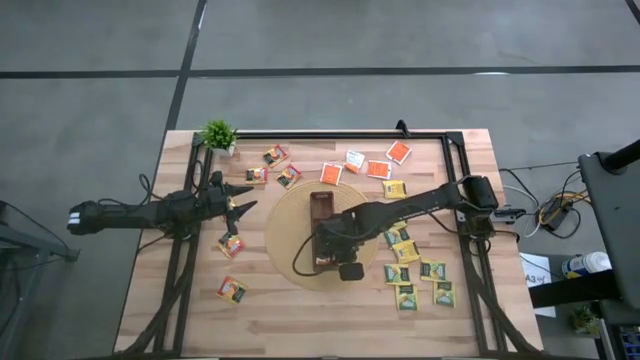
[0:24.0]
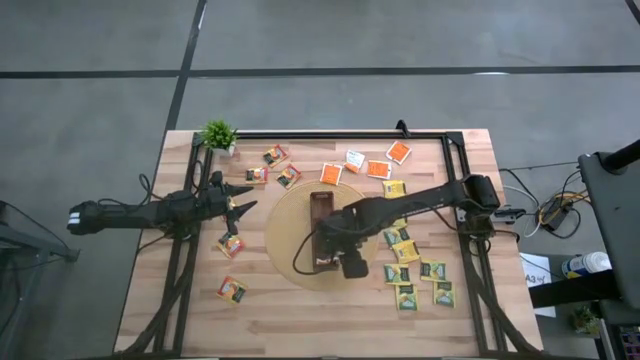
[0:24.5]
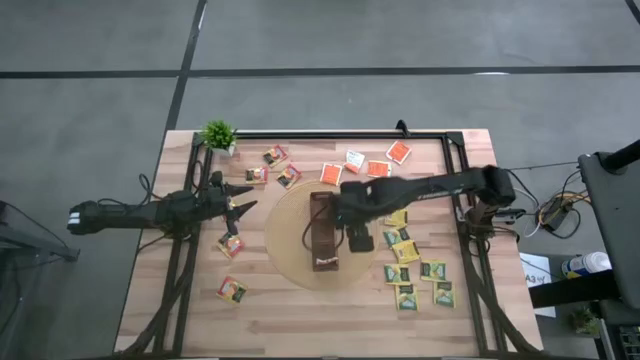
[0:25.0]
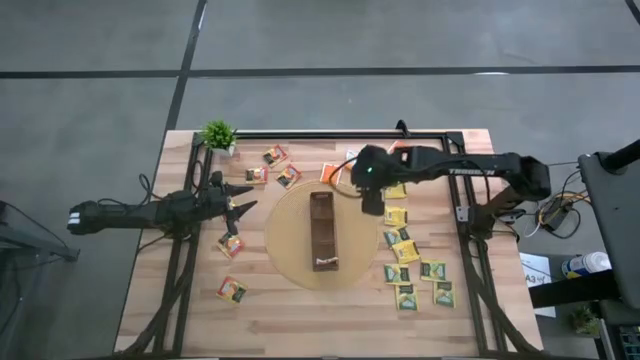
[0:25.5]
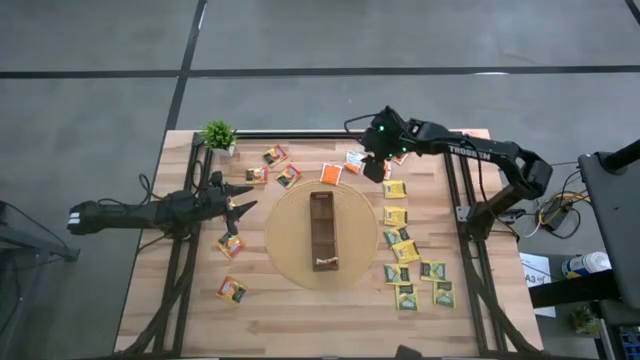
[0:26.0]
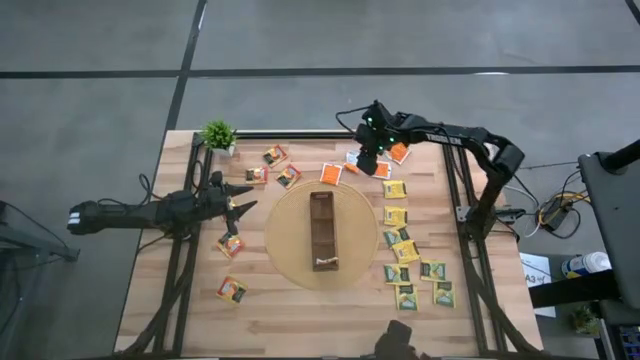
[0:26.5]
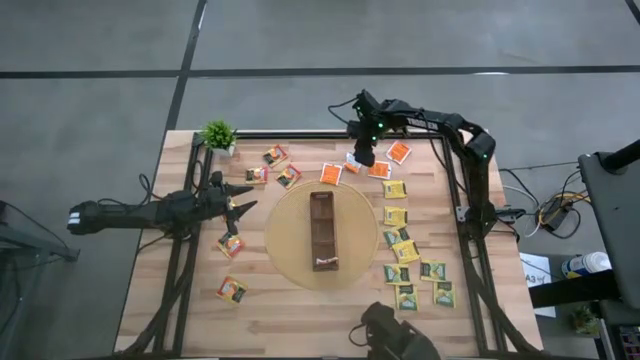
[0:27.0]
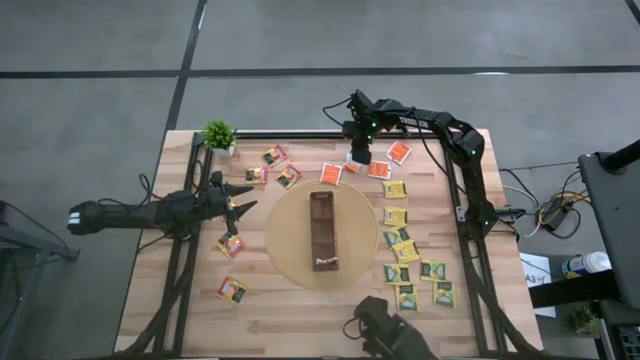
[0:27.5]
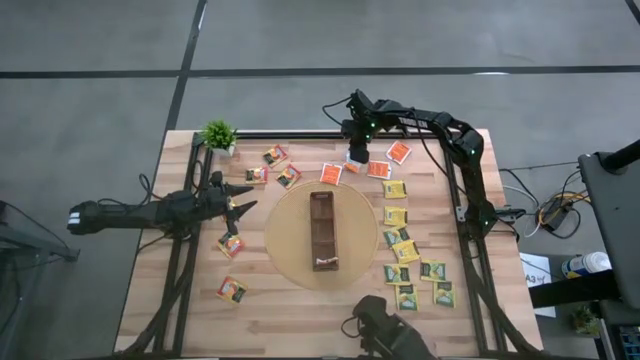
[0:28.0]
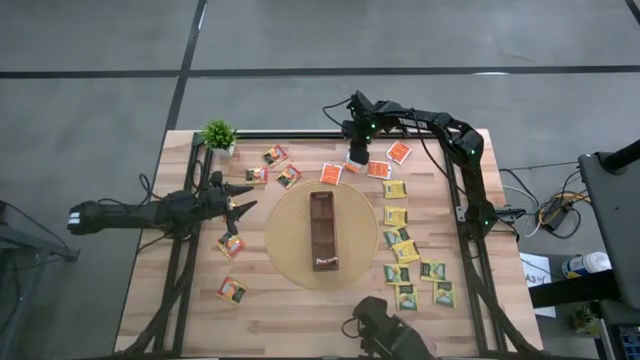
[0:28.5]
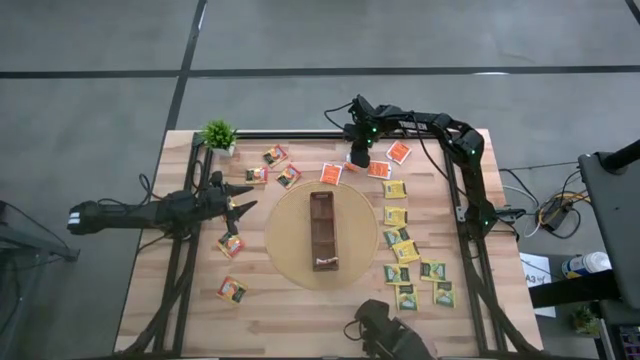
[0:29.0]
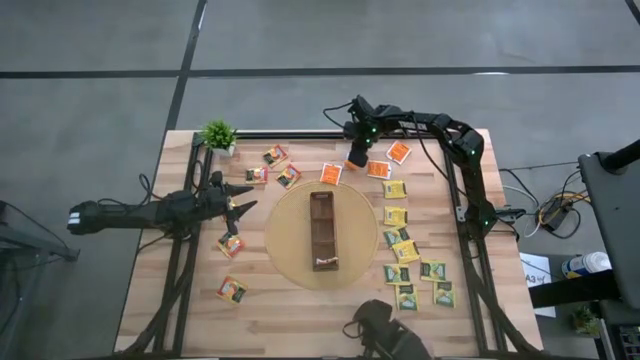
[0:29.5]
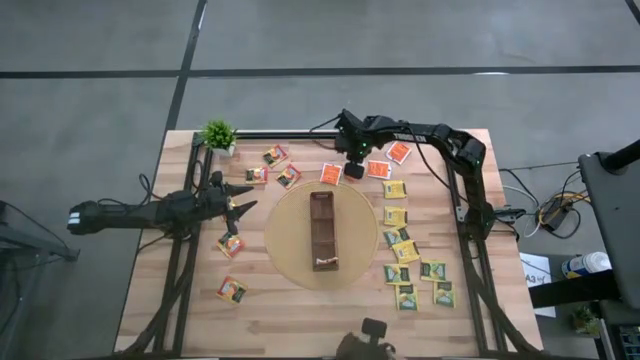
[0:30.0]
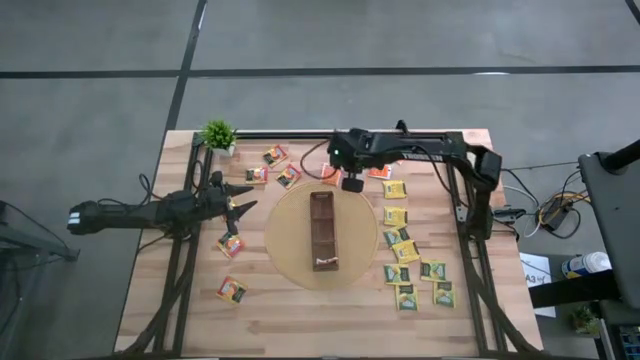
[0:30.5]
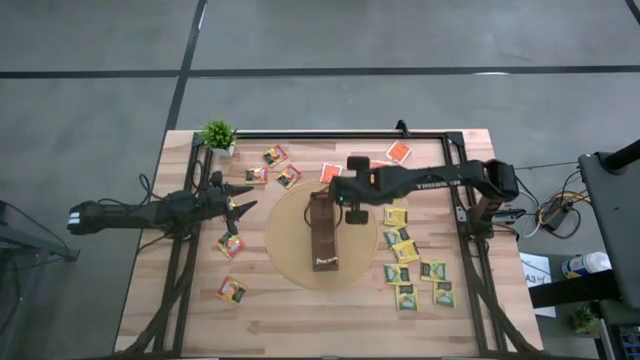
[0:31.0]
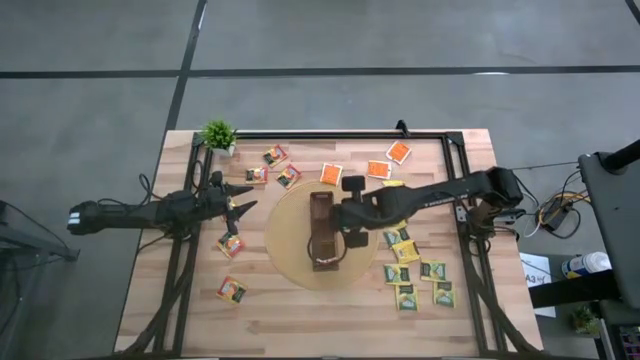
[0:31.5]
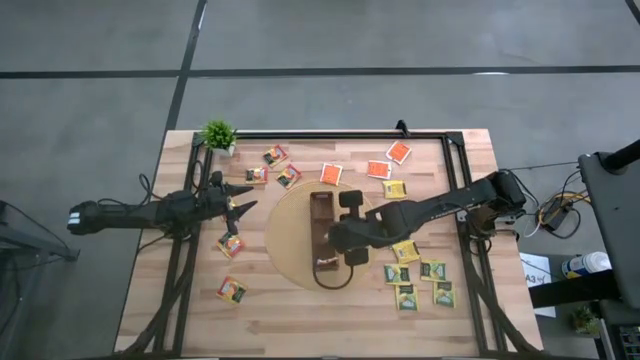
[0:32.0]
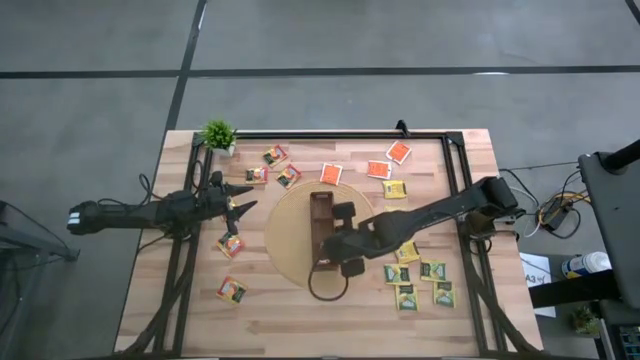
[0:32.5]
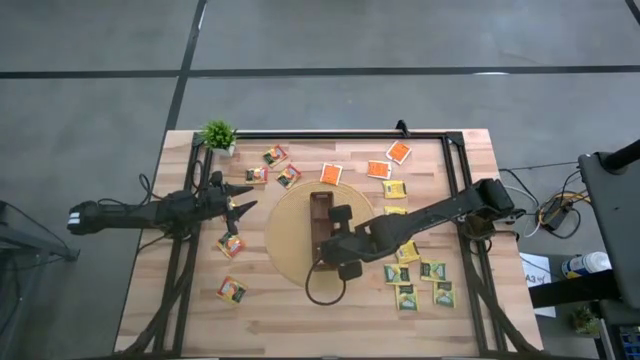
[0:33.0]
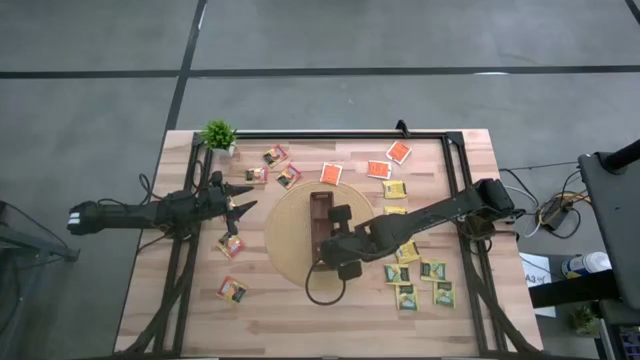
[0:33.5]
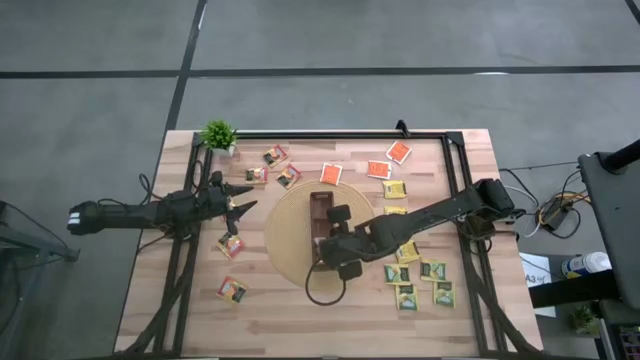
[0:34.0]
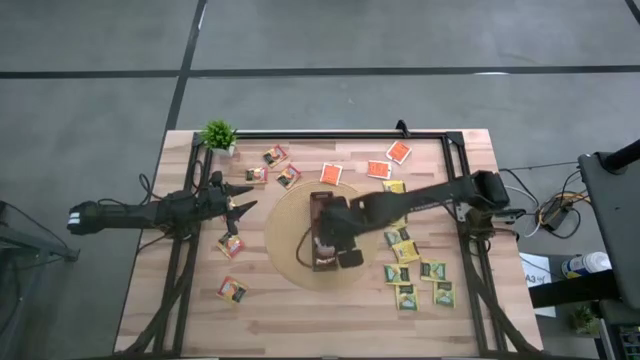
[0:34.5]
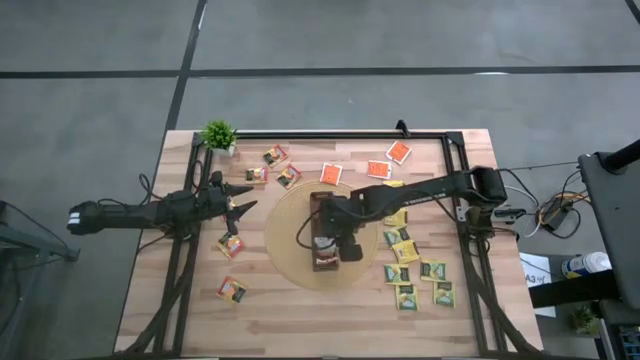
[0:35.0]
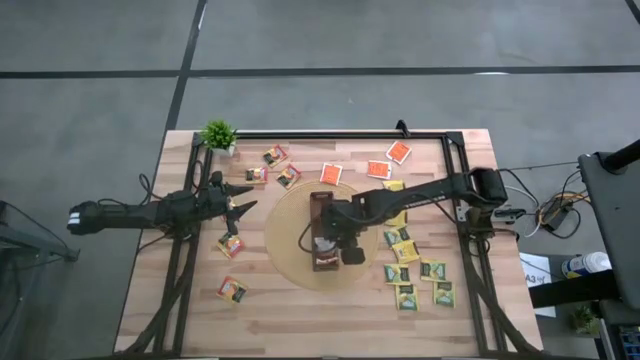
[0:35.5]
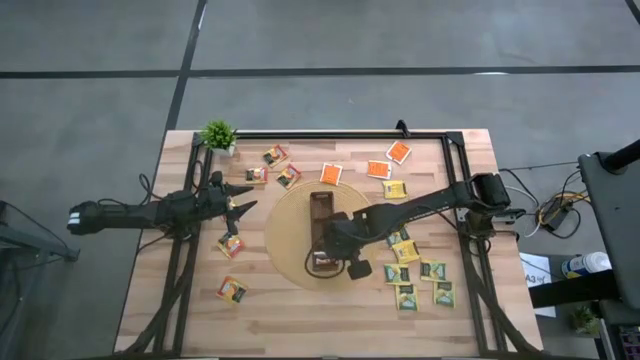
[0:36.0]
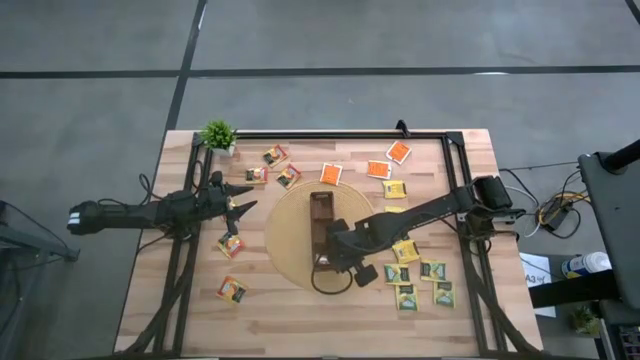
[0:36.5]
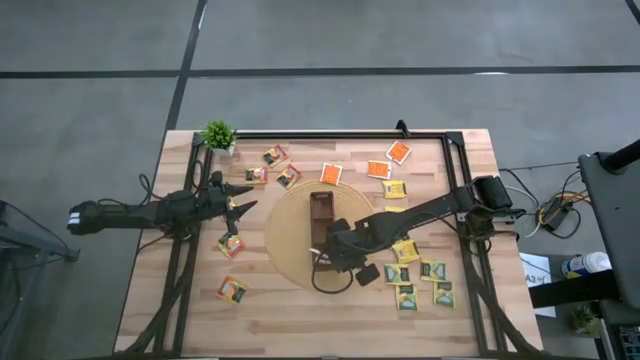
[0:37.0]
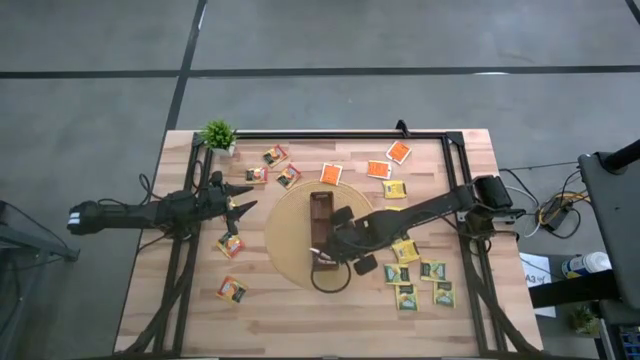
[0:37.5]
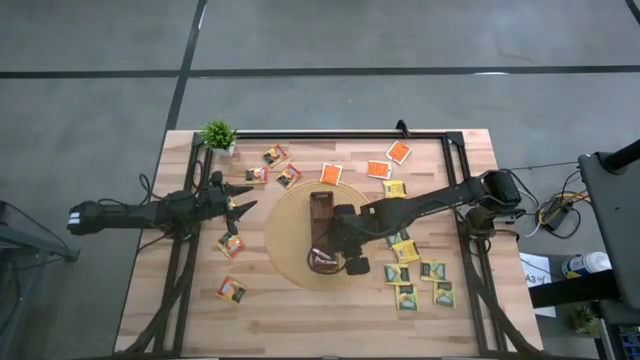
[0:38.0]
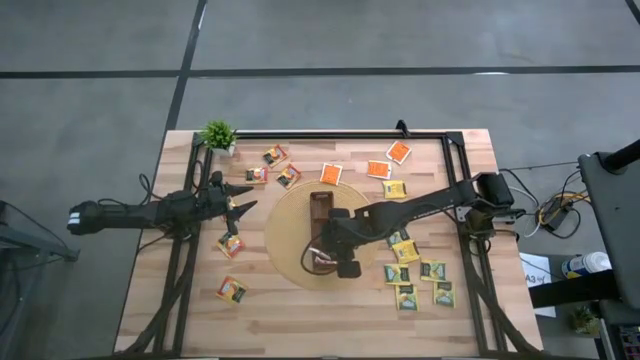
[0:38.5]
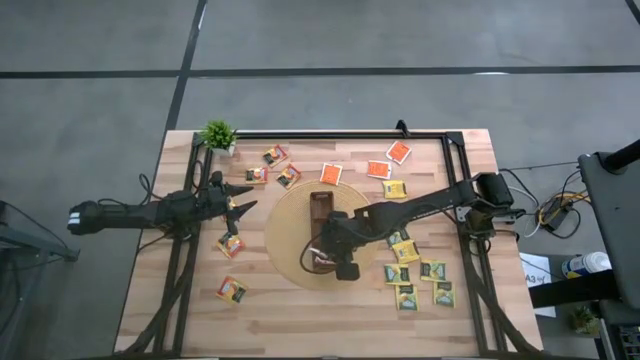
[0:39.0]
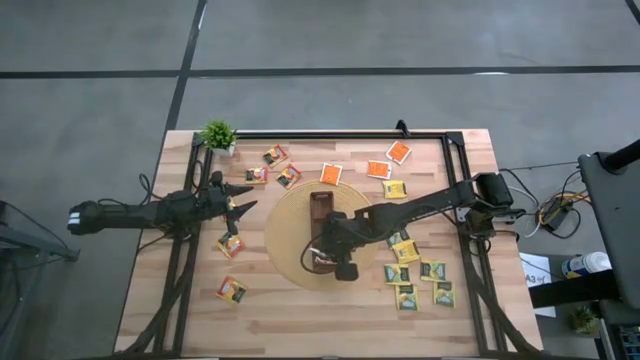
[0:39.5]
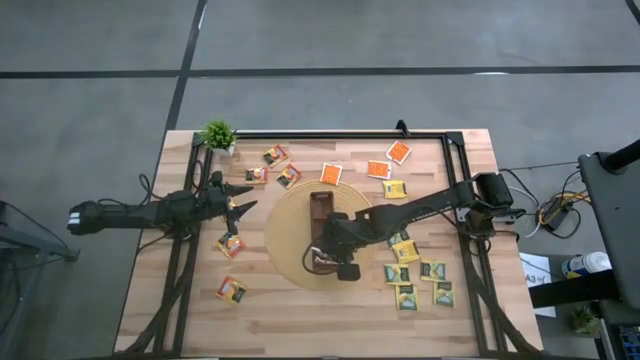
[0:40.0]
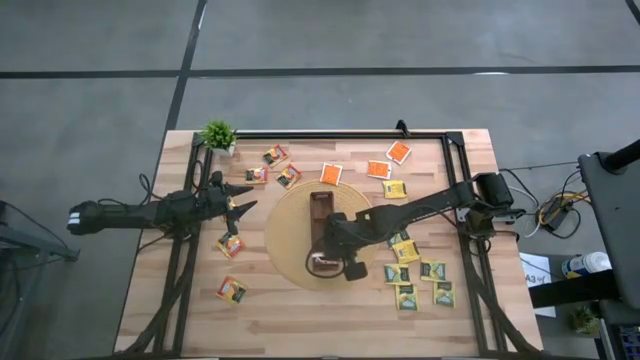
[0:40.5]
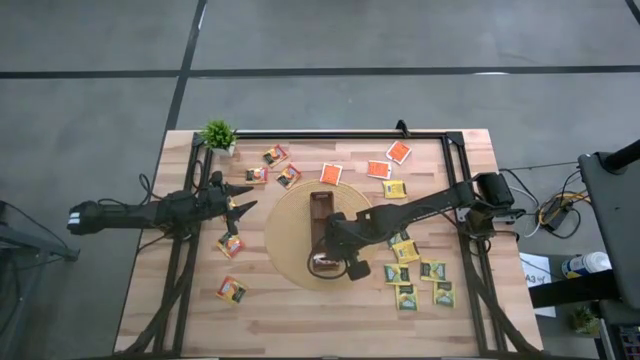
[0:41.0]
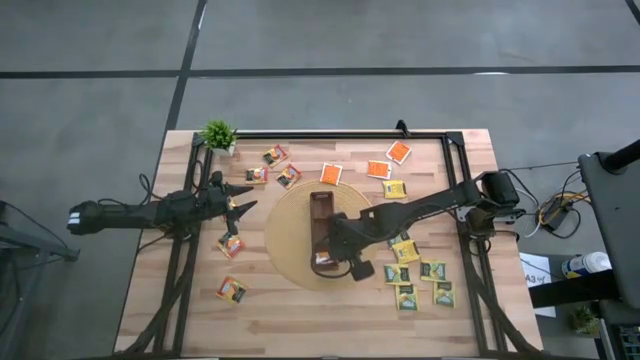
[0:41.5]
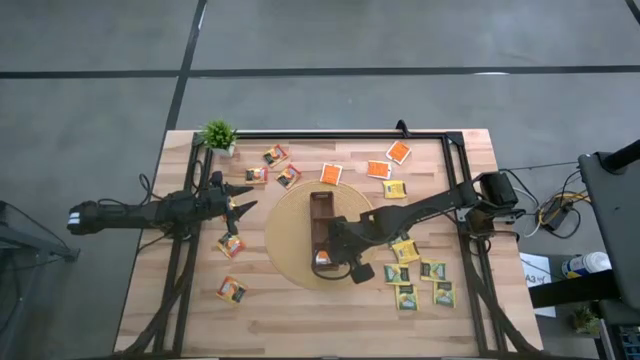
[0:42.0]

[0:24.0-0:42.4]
Task: Pick & Place Tea
Put the white tea bag into the bottom section of the wooden organizer

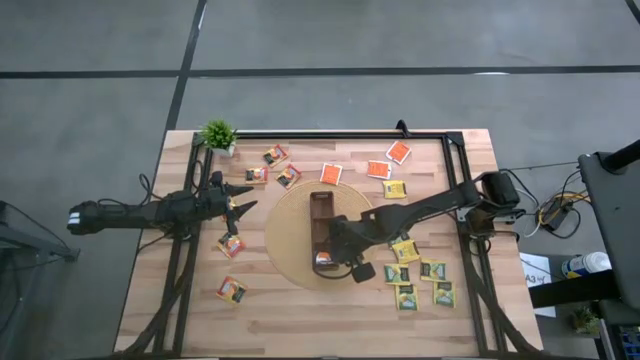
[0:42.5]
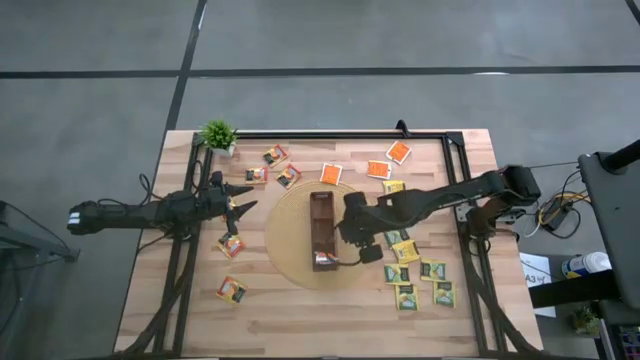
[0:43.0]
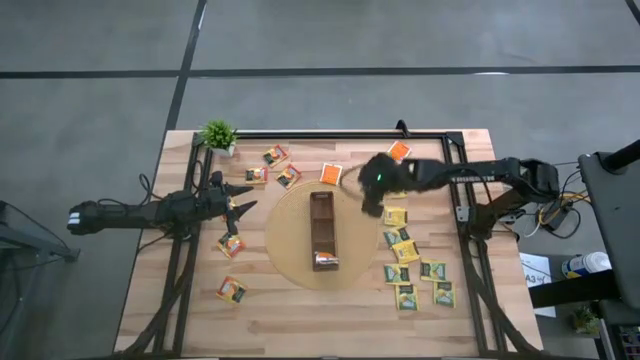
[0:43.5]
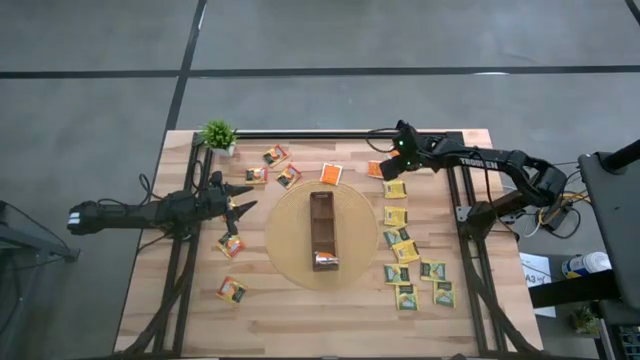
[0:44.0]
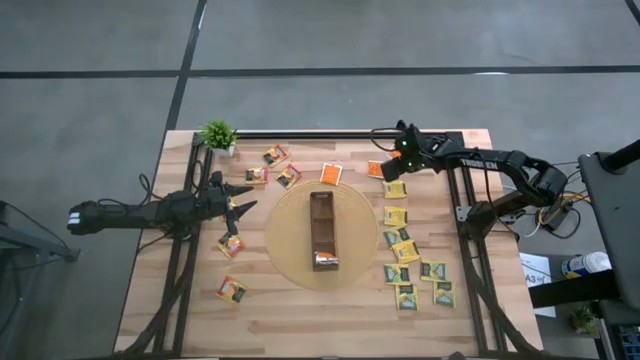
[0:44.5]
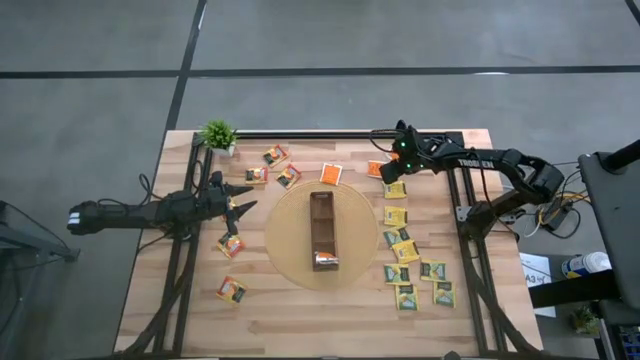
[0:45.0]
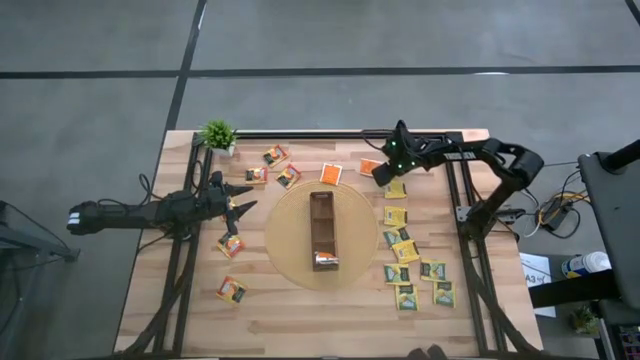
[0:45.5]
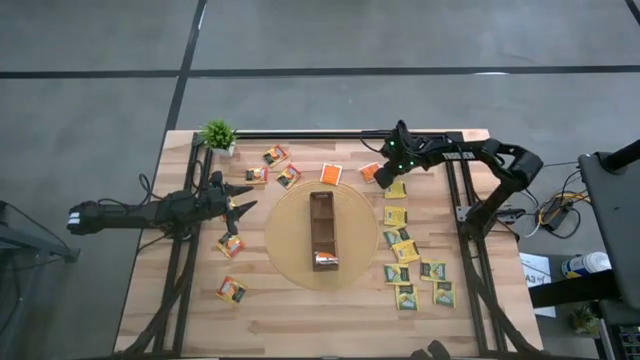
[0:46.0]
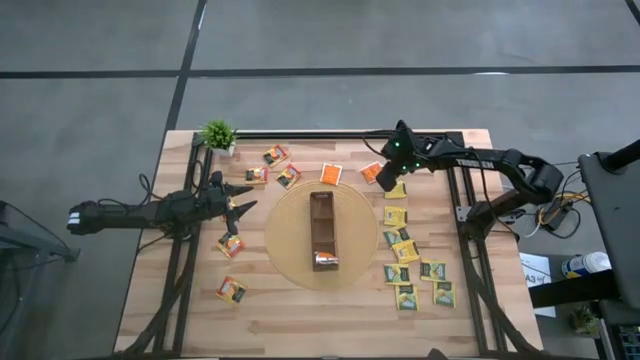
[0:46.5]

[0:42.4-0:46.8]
Put the middle white tea bag into the bottom section of the wooden organizer
